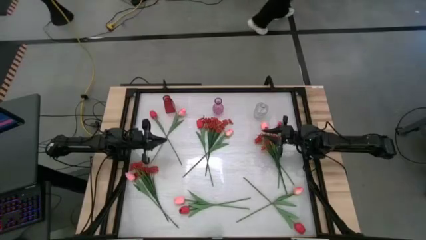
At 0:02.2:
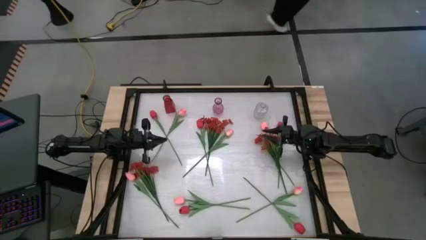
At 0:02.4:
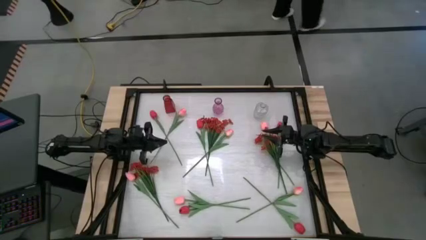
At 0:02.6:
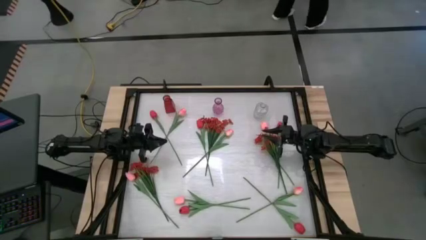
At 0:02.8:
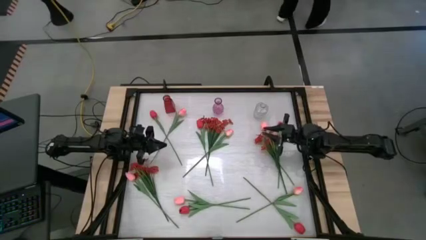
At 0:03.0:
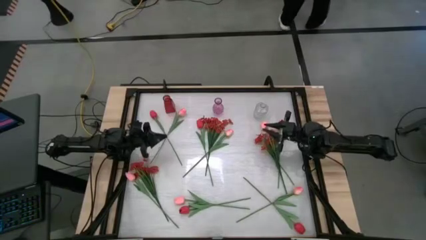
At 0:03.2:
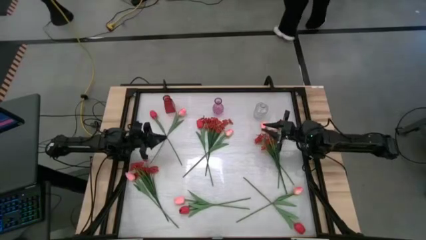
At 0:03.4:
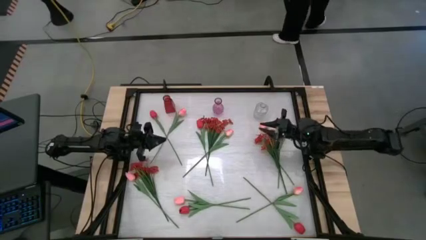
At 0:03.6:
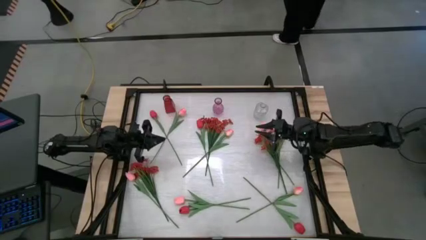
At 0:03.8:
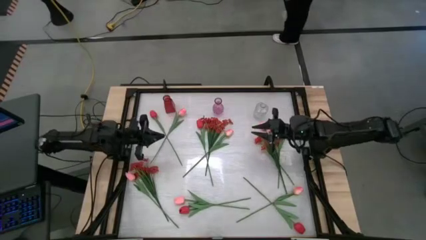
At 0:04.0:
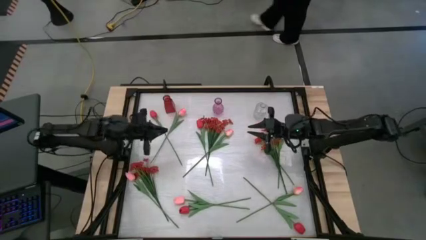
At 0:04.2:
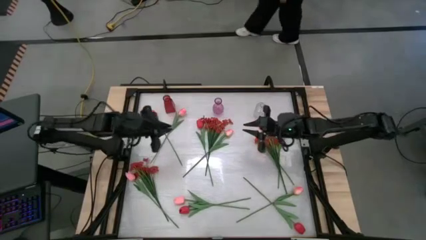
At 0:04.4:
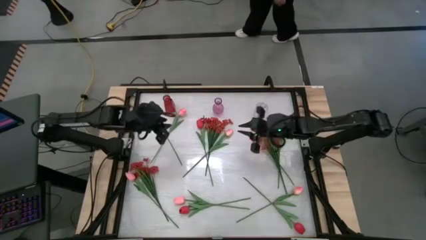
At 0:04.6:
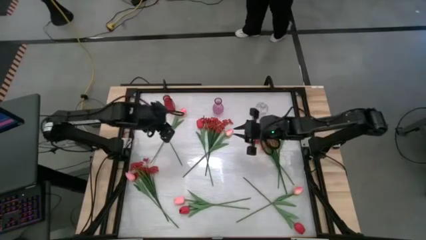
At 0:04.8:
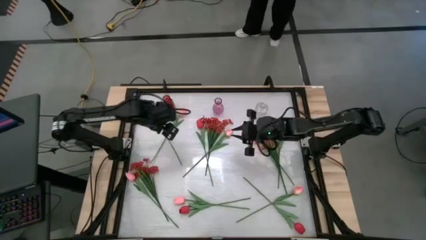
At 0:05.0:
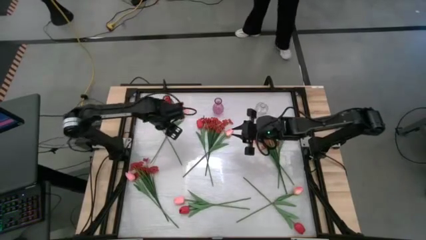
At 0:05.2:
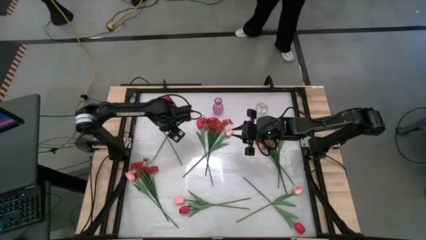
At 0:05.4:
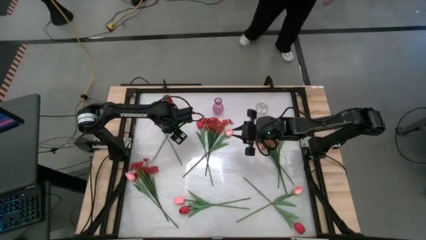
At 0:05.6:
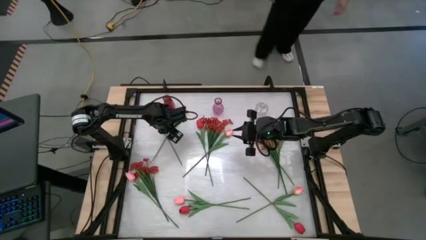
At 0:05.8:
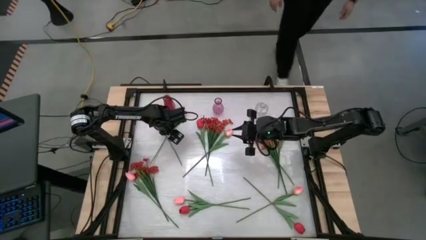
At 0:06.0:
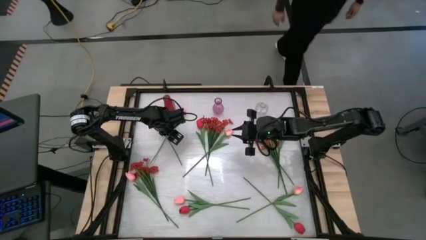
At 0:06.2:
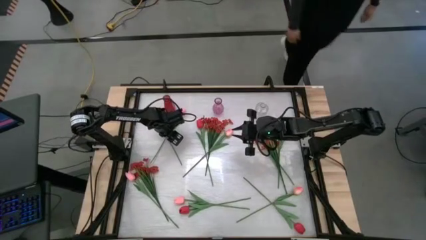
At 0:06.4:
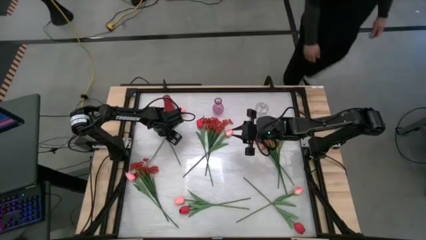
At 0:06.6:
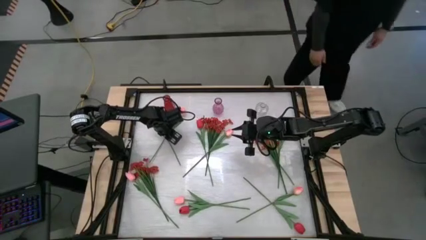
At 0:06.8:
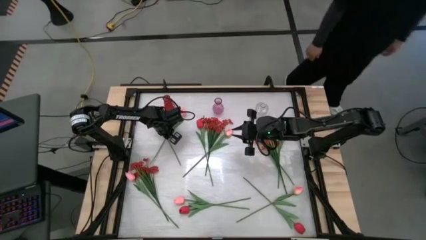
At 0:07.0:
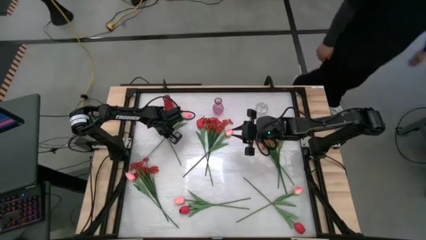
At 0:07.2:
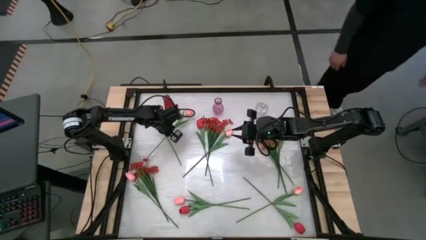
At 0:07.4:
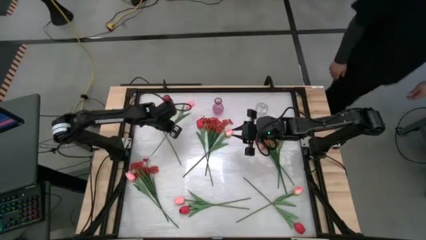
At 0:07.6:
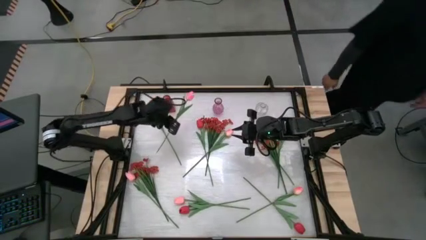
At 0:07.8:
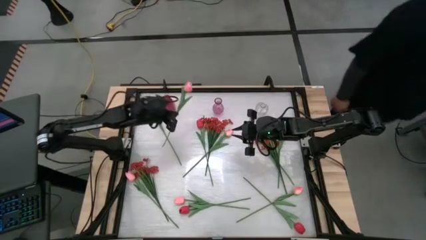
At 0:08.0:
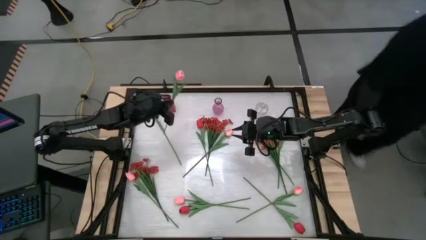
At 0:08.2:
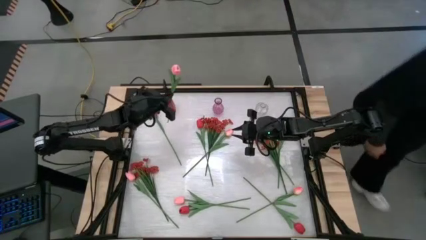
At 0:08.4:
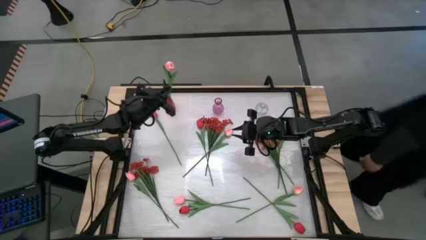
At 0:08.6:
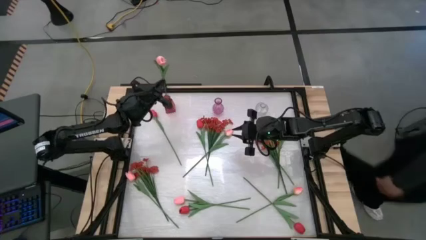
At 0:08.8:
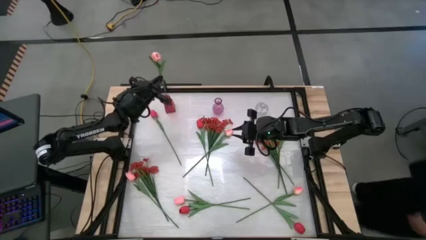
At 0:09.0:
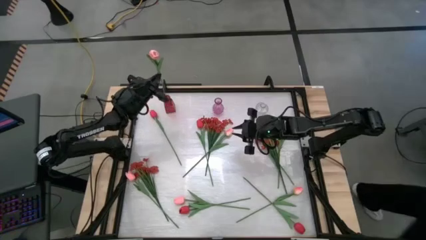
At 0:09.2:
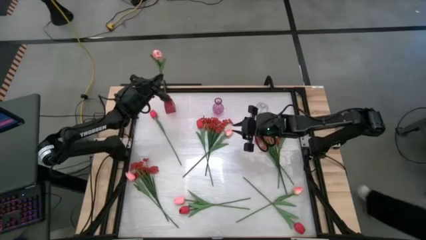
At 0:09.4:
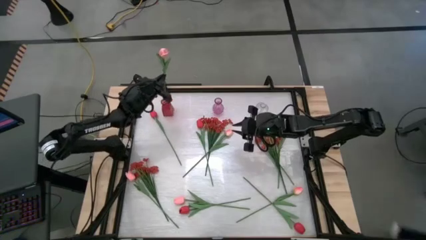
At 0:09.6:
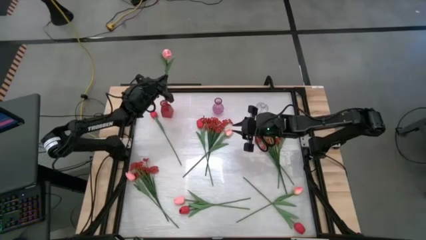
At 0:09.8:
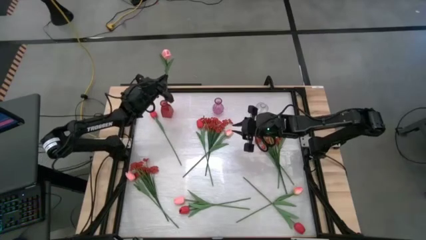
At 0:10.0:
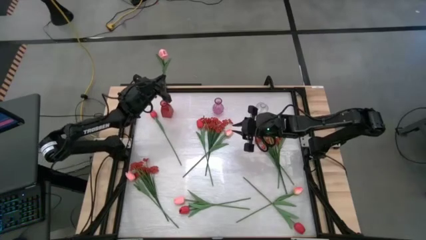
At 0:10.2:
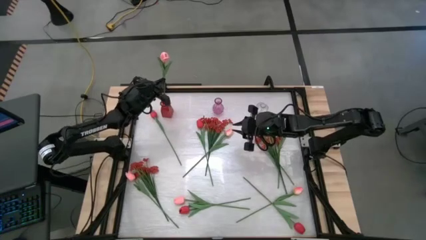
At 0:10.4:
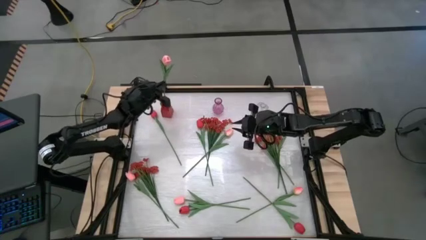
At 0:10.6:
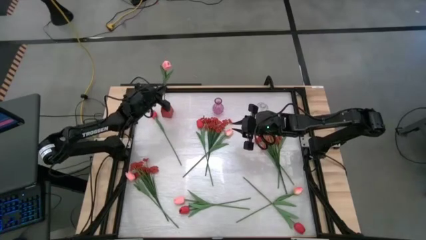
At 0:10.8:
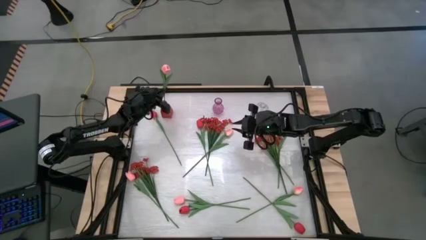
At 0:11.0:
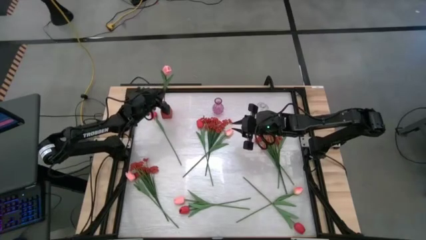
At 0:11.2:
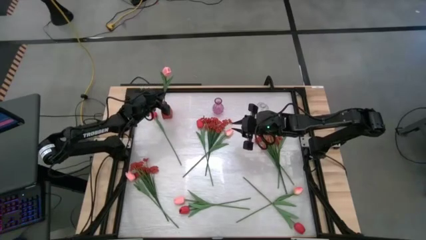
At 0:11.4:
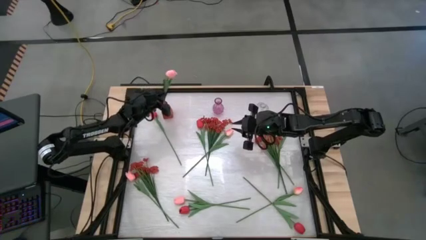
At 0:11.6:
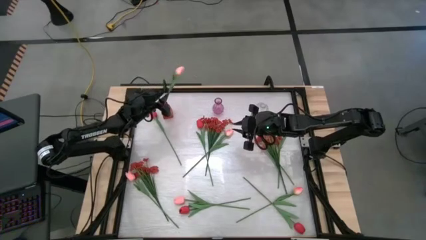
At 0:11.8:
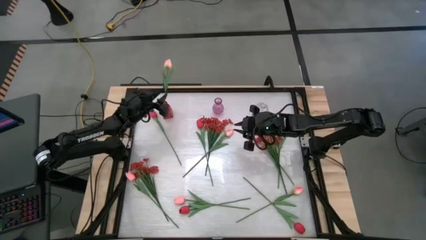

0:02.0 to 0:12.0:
Task: Sort flowers into vase by color
Put the pink tulip into the red vase

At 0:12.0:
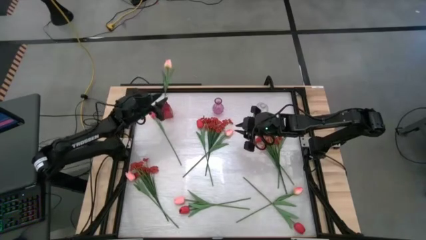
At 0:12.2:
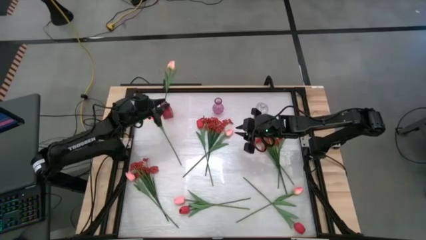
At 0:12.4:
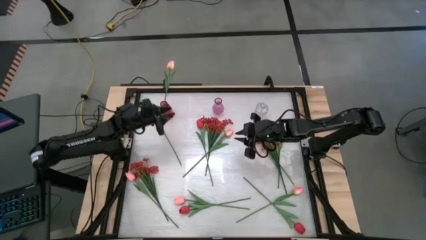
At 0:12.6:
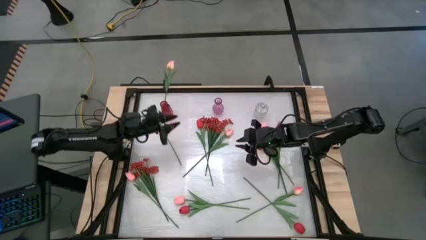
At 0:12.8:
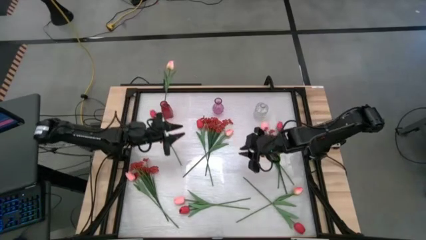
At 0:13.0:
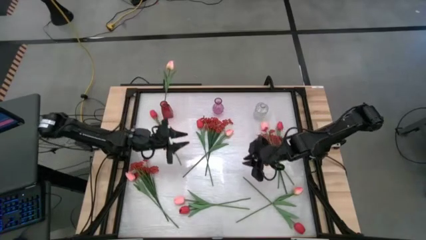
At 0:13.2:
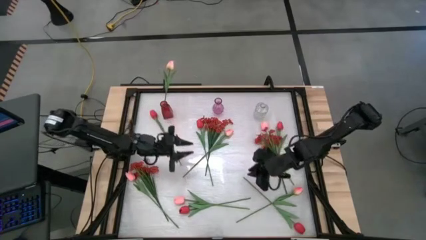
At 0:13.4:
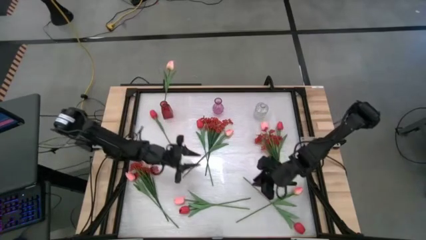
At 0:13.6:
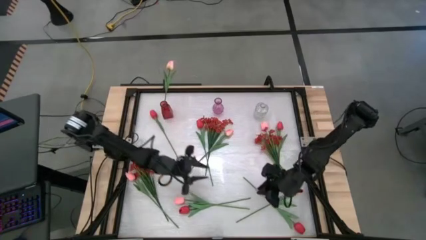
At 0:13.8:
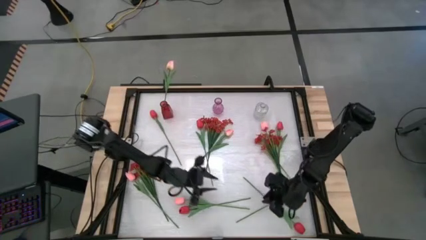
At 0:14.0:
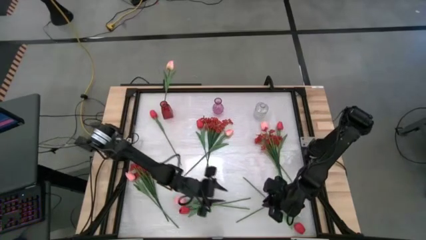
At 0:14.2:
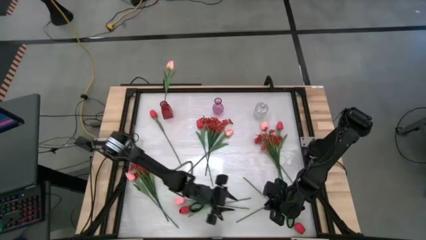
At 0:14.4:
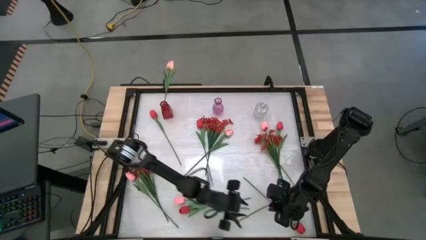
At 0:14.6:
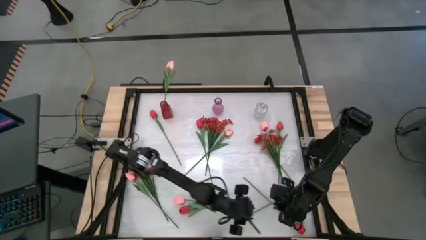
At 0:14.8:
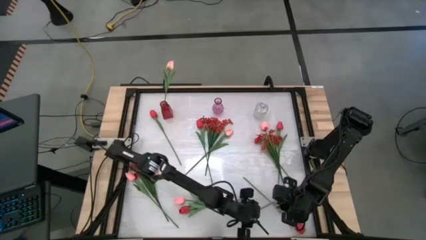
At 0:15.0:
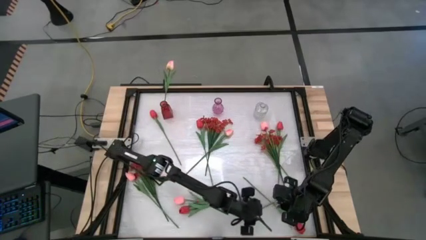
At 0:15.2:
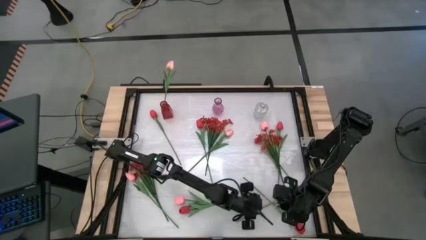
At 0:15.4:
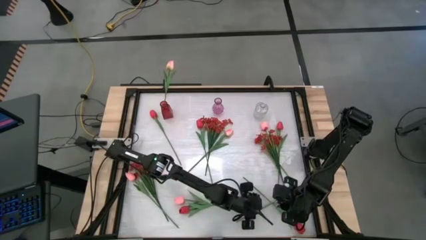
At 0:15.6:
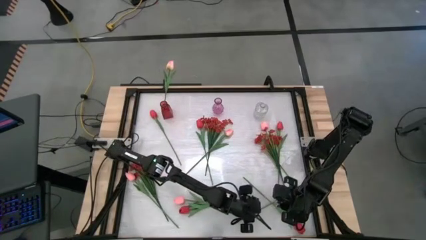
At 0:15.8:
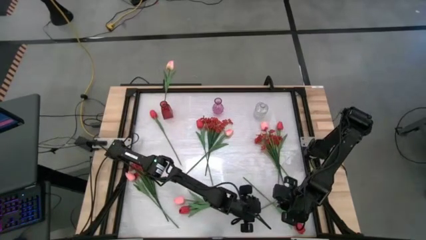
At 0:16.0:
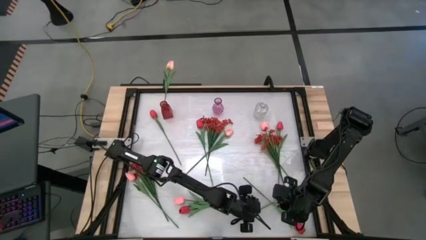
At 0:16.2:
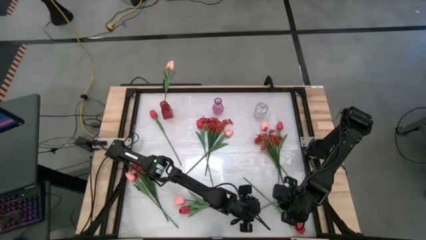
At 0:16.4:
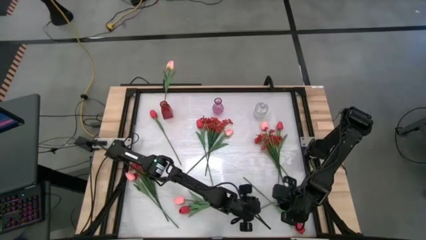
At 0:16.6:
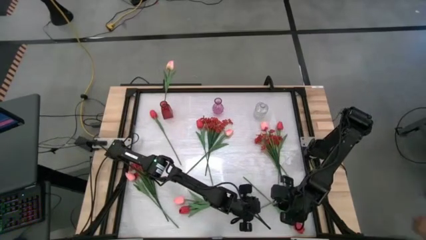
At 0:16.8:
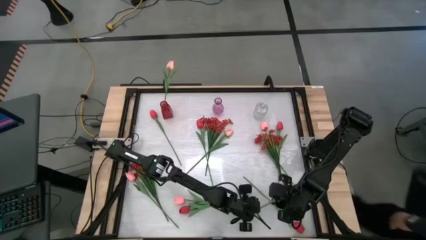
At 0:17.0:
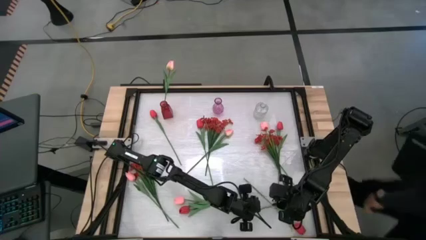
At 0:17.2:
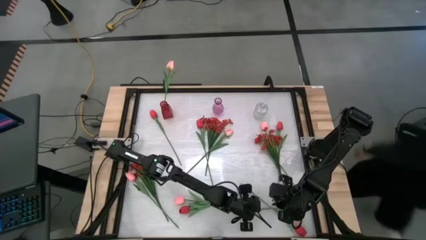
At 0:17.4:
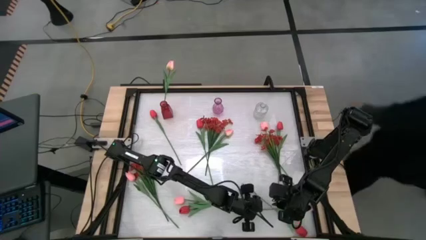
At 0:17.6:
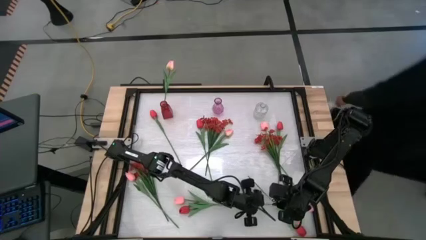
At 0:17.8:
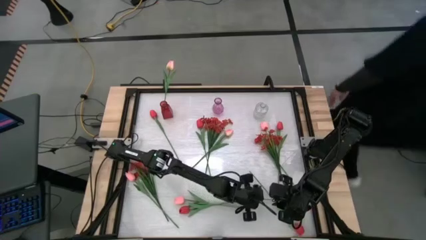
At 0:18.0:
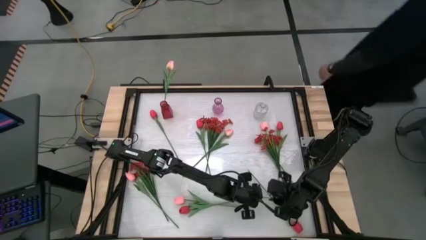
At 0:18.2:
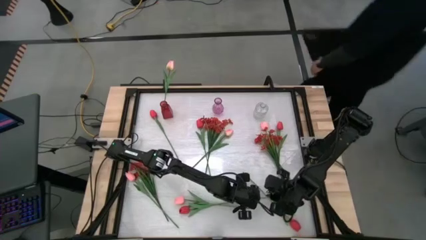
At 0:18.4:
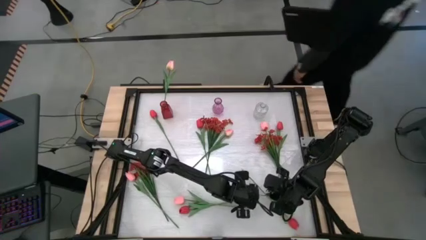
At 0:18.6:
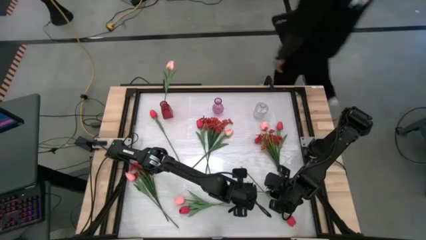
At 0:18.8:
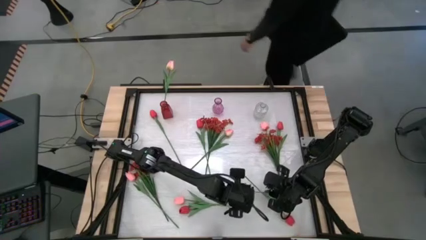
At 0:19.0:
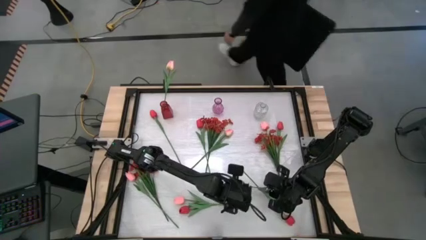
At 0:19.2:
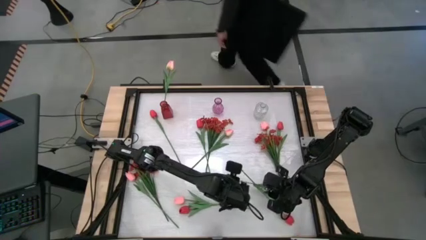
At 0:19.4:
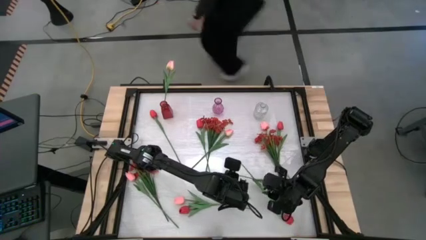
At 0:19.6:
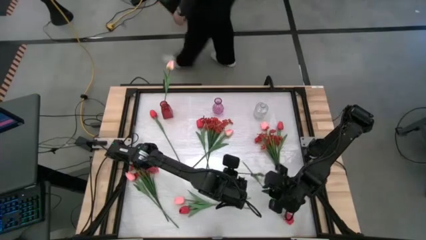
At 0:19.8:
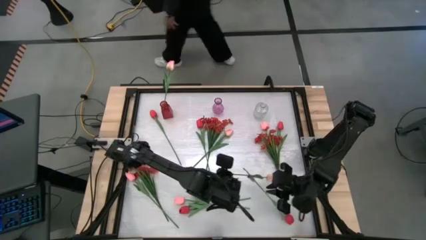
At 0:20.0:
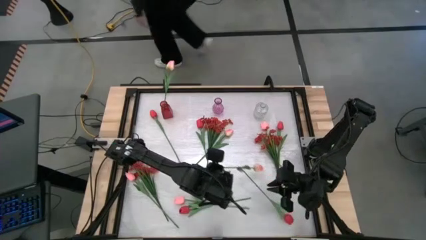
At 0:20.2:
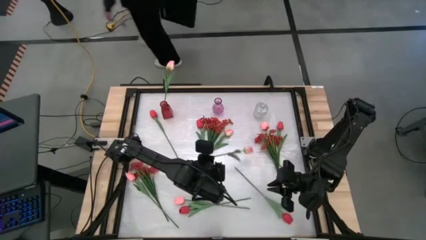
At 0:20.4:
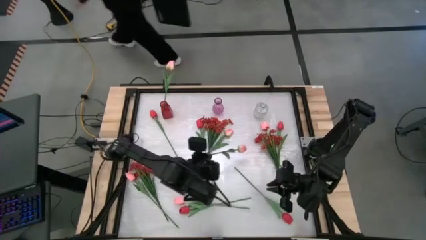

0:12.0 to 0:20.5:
Put the pink tulip into the red vase
